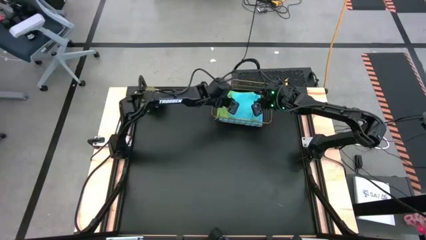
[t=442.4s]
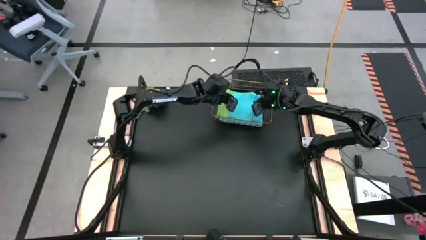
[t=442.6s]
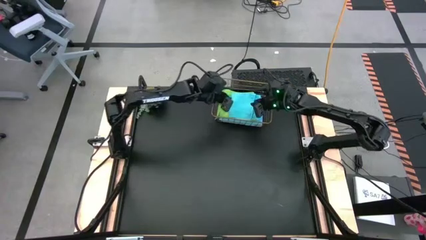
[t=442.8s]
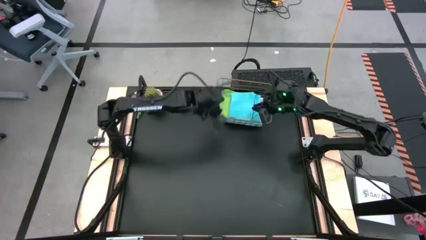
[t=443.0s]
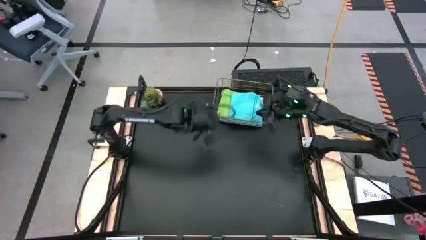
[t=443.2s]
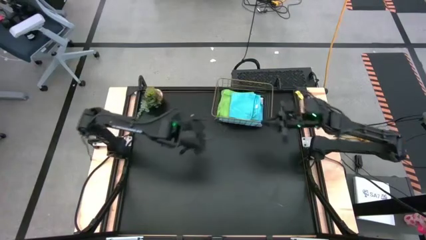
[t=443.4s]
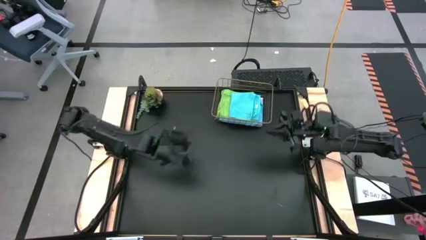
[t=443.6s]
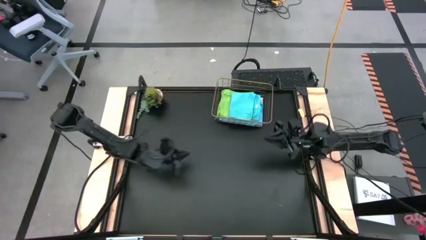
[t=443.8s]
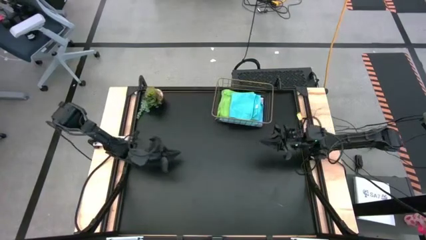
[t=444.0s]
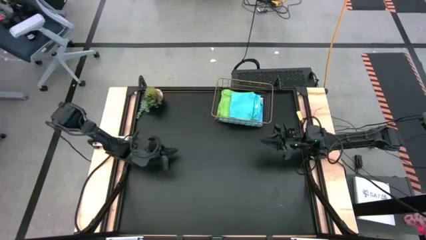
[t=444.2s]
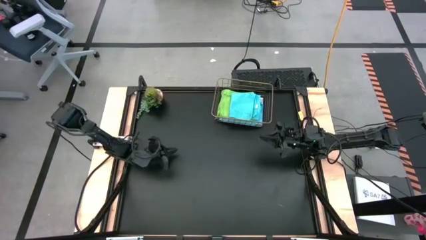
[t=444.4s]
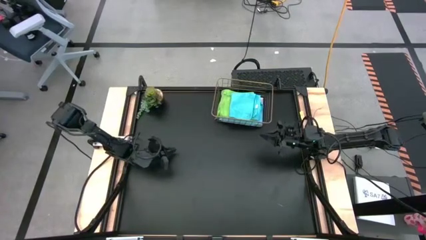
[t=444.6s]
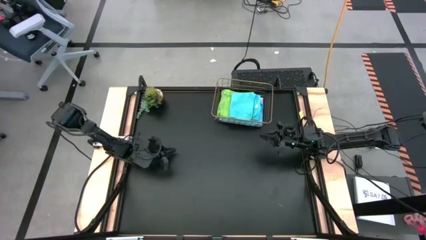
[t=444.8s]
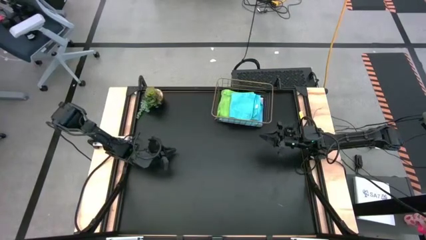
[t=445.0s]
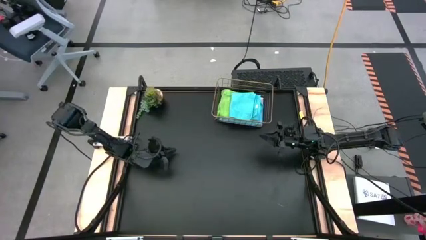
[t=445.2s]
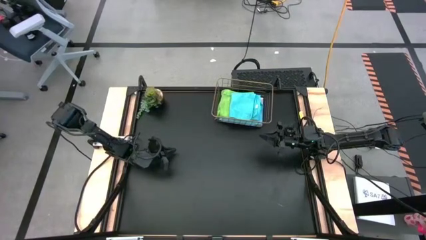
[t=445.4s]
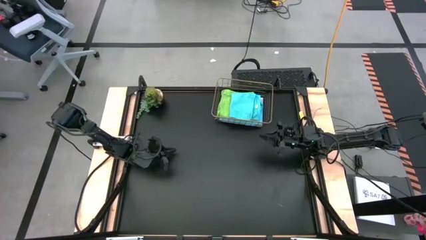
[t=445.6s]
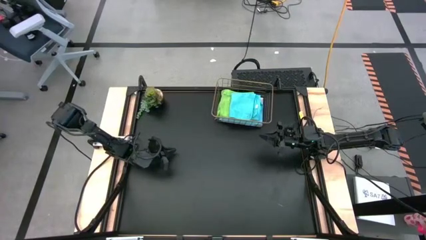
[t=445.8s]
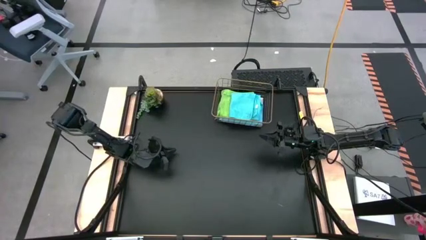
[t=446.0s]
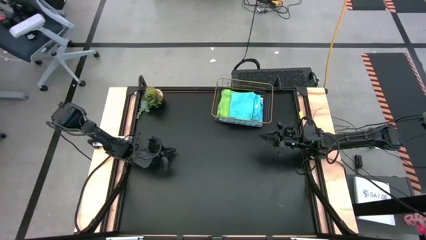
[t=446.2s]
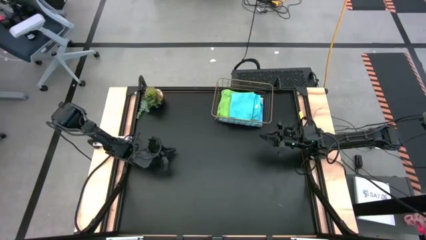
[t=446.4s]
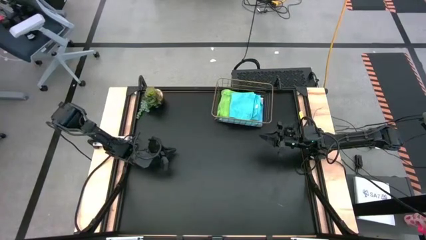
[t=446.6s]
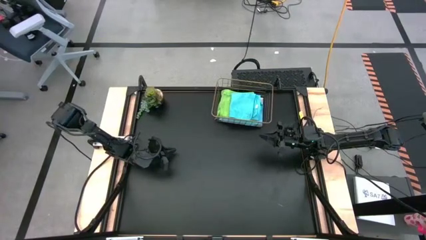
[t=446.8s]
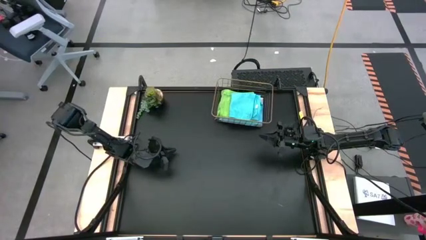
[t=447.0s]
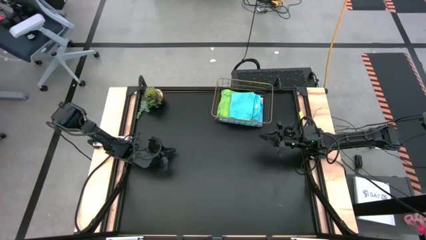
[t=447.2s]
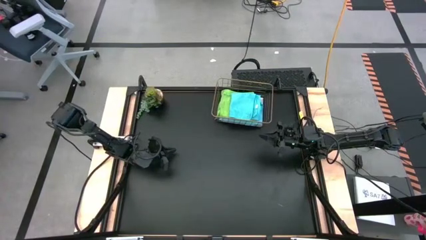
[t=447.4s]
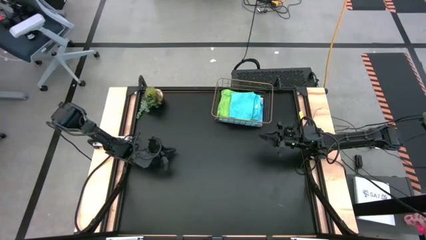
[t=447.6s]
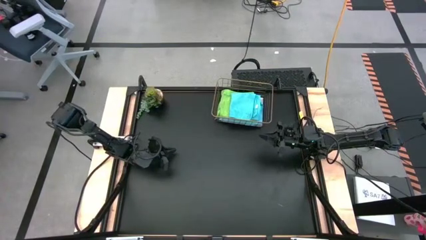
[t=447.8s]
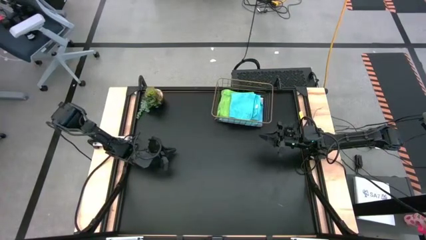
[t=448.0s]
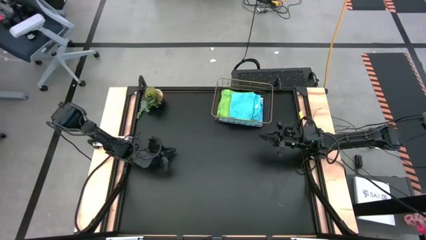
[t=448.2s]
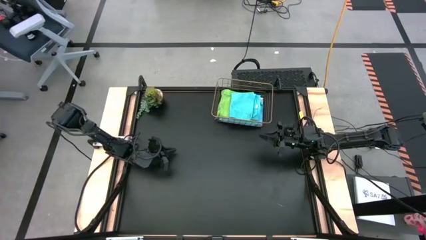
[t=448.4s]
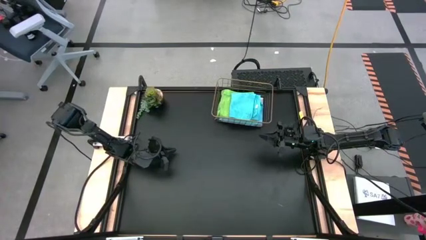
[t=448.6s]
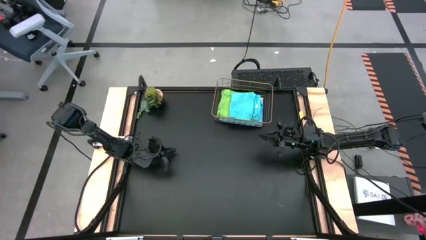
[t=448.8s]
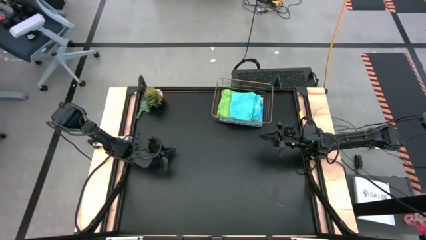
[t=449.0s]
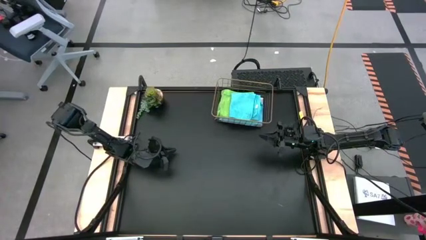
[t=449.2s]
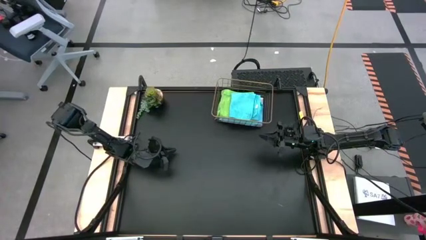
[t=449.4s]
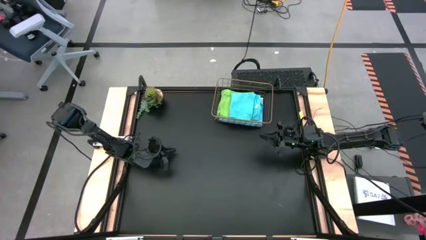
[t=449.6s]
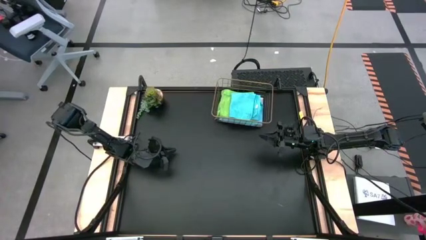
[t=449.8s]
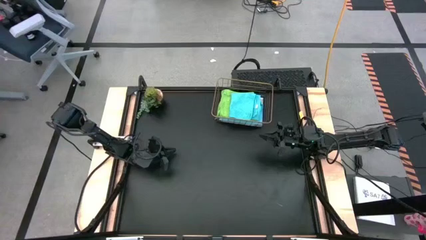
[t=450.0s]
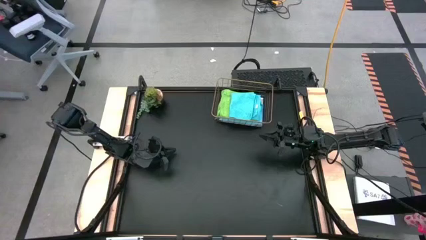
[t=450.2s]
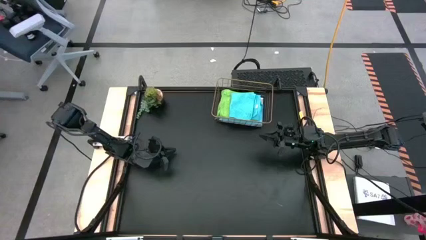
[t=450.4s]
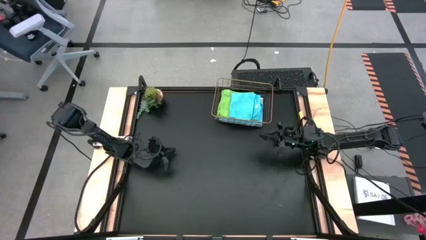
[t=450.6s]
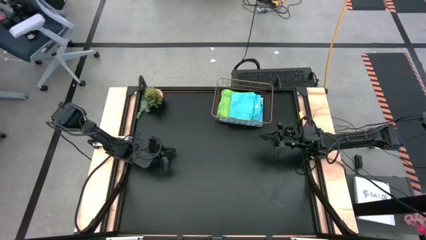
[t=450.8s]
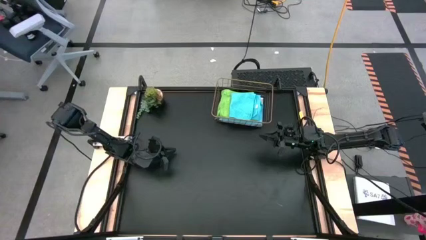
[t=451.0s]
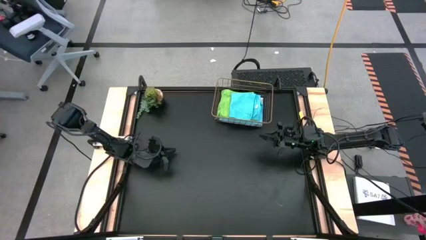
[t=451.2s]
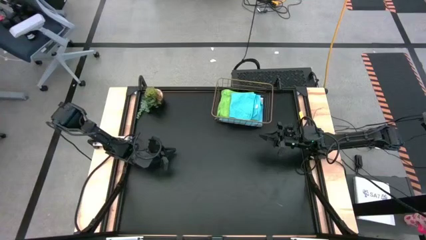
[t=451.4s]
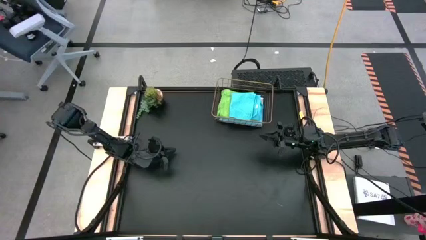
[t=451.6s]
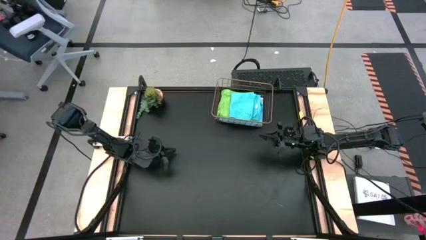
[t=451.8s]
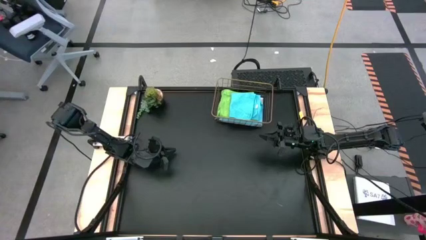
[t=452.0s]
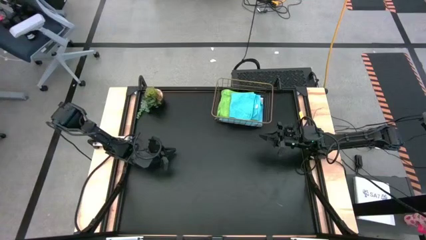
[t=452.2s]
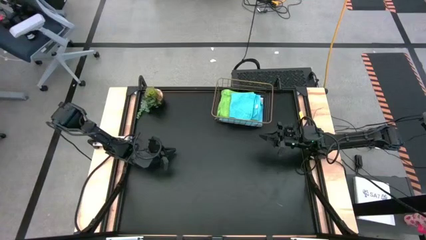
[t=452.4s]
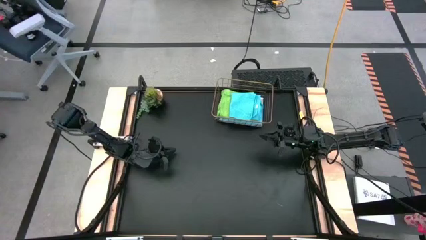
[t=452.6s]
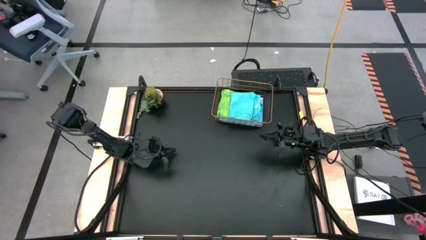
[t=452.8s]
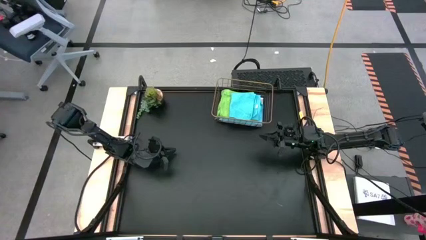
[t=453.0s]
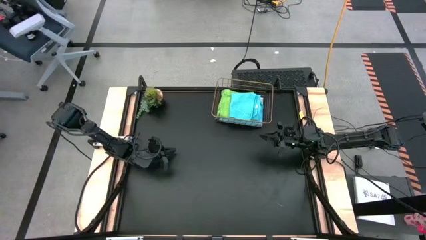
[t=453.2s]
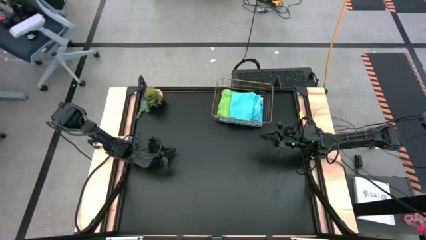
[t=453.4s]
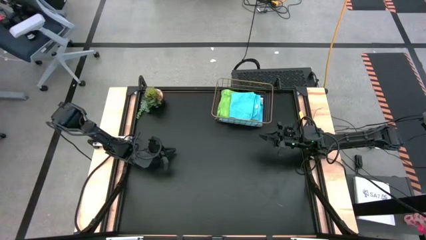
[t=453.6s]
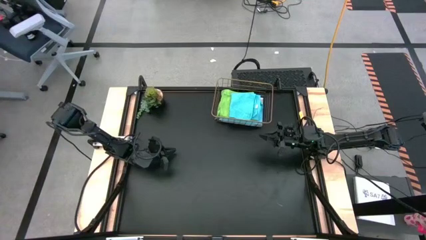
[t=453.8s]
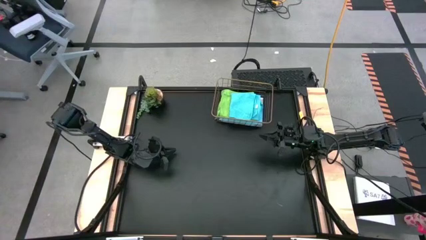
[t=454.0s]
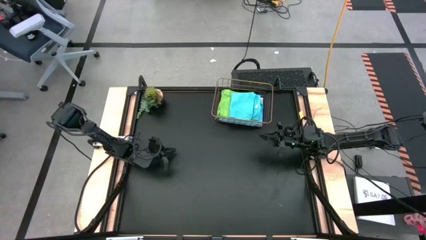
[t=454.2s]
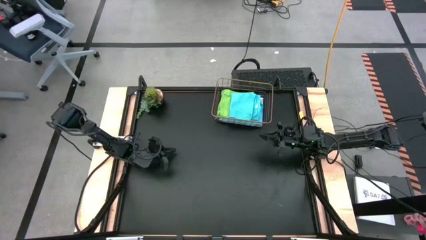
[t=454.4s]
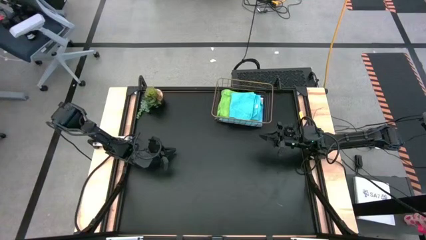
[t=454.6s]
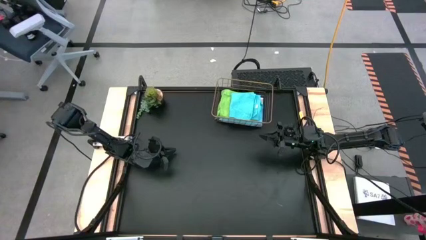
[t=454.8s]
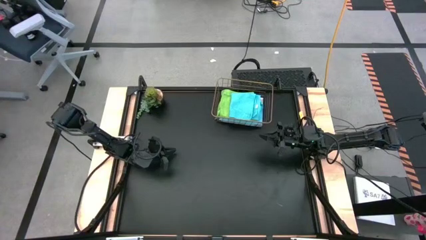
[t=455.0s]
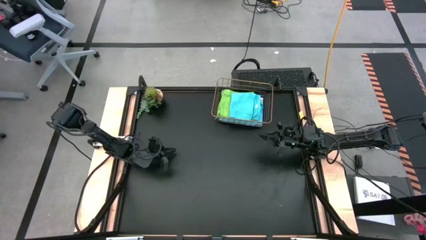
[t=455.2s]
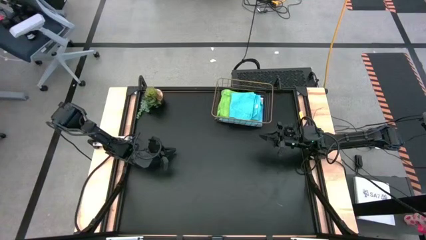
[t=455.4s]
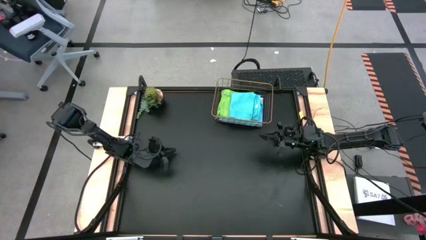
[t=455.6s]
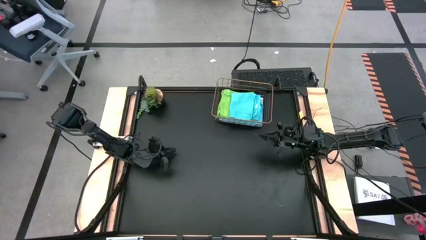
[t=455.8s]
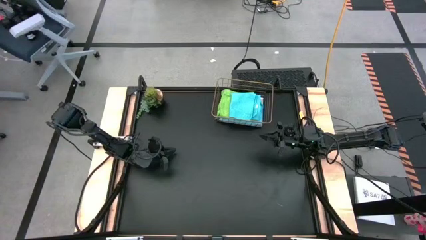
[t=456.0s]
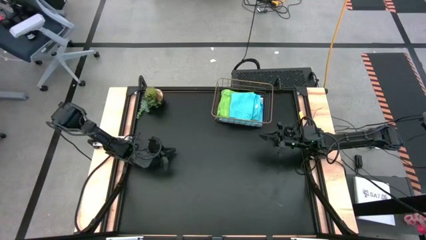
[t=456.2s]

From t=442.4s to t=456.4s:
Task: Fold microfiber towels
Return to Home Position
